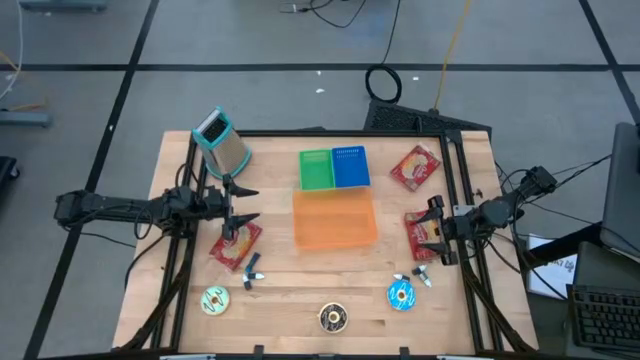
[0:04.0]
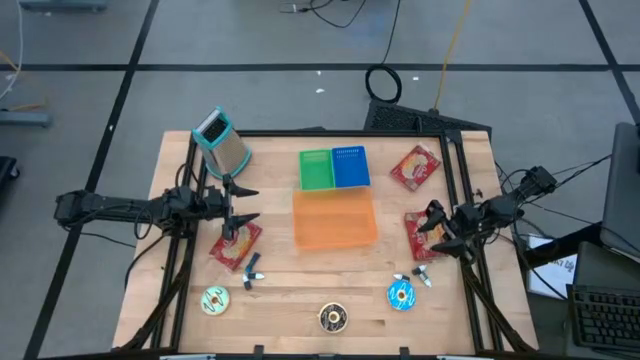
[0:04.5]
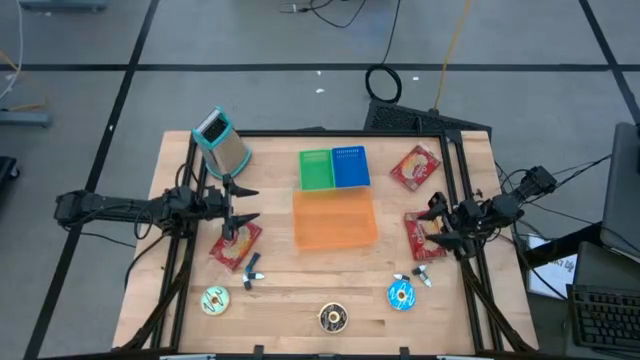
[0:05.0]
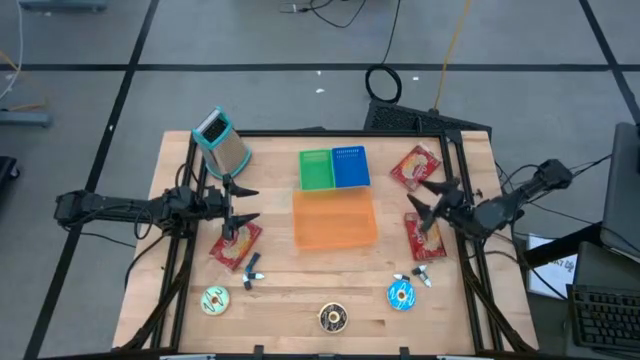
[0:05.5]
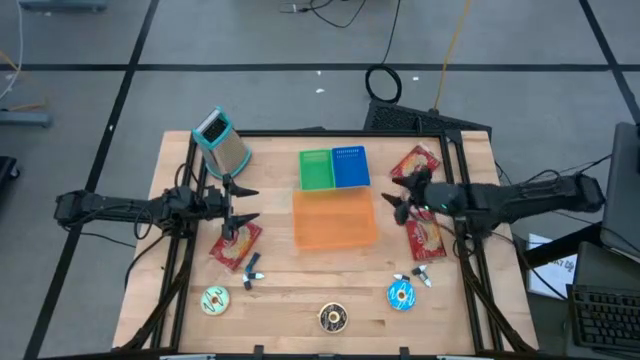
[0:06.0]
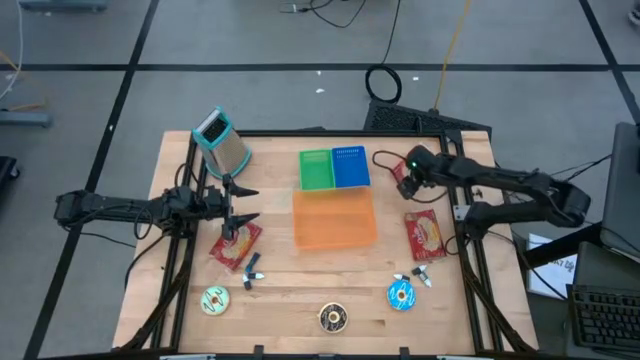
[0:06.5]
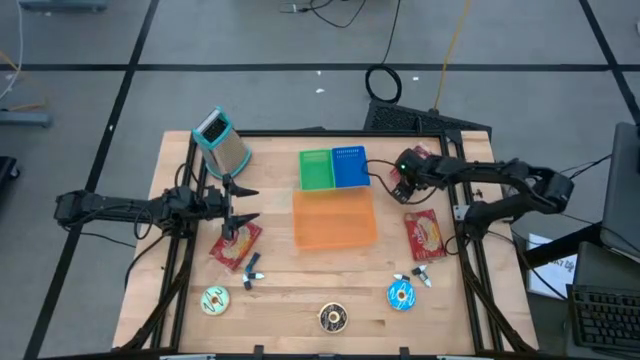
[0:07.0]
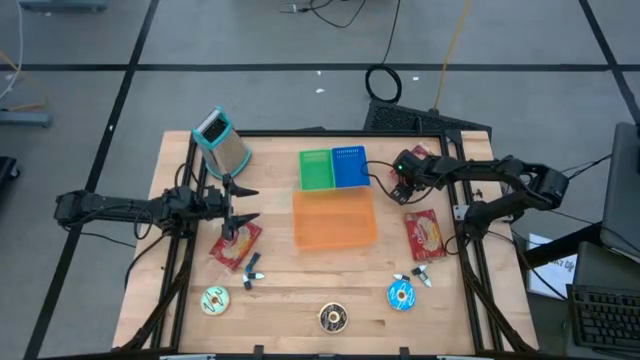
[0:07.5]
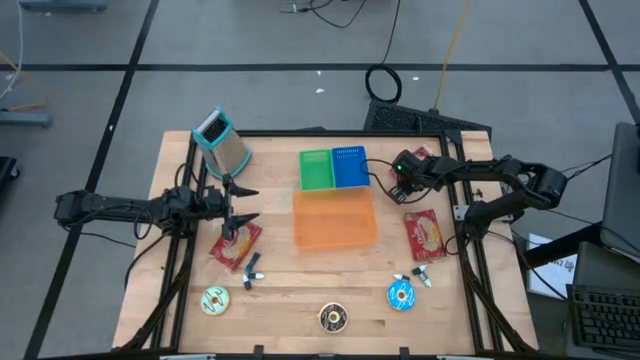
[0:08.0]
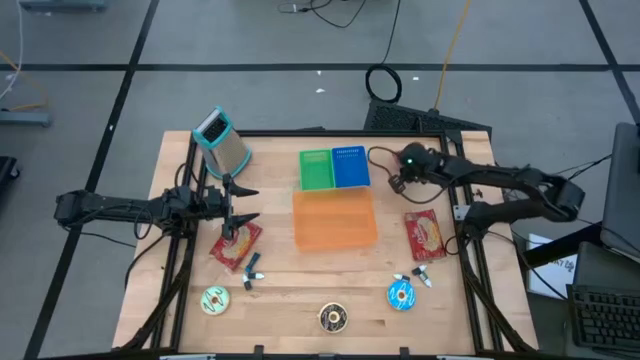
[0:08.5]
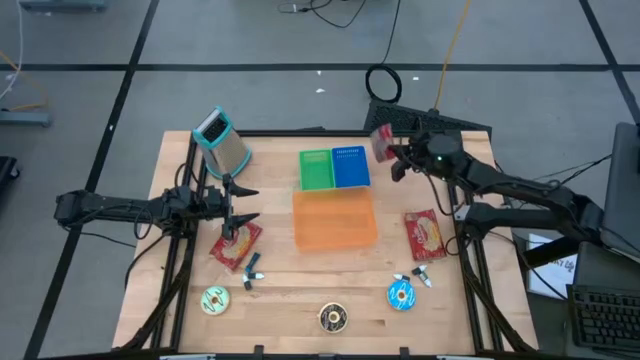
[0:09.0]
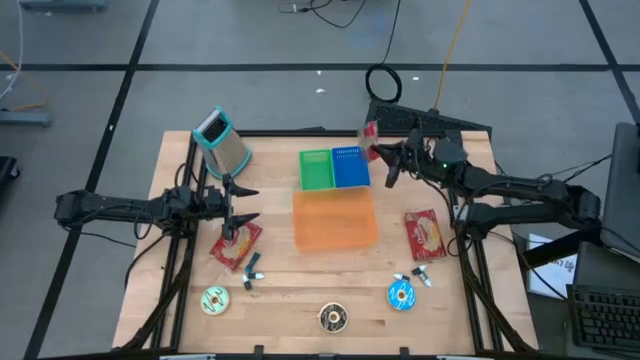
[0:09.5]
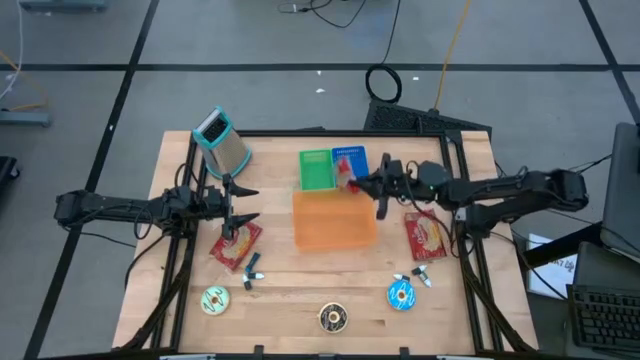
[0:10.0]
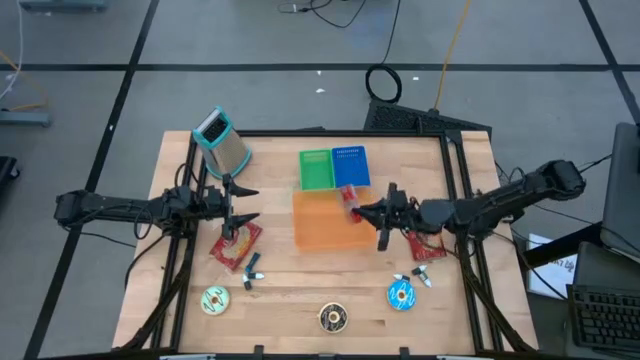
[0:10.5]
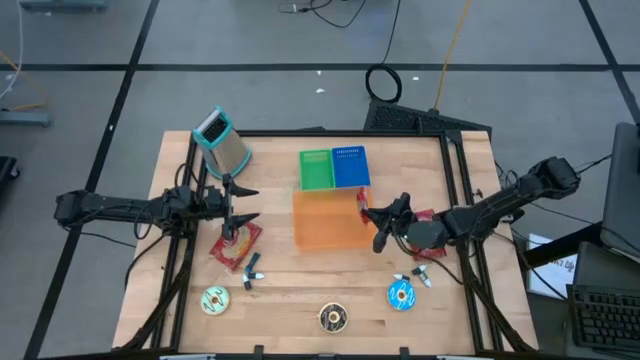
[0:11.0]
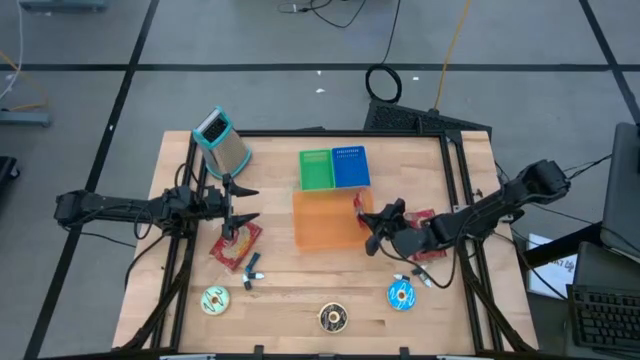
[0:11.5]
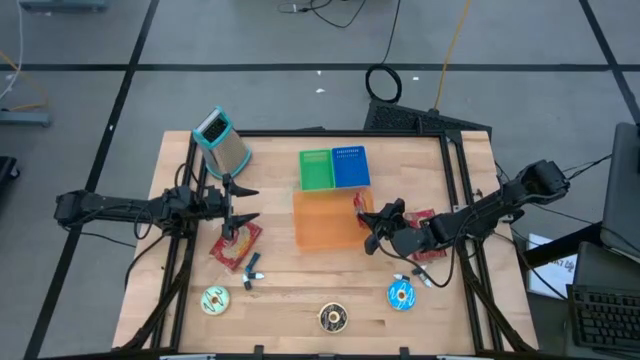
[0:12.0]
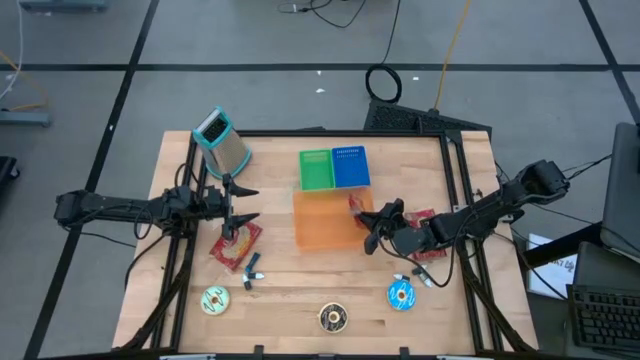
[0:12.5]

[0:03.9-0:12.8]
Put the top right red popcorn bag into the orange bin

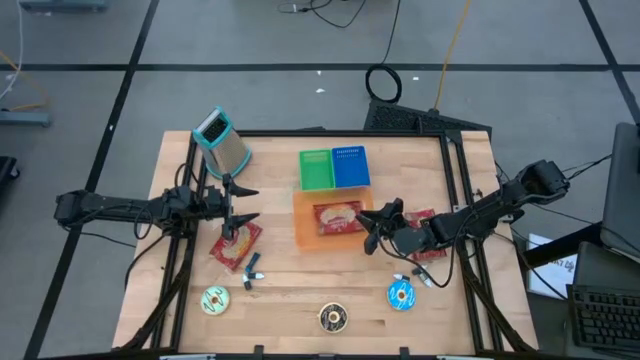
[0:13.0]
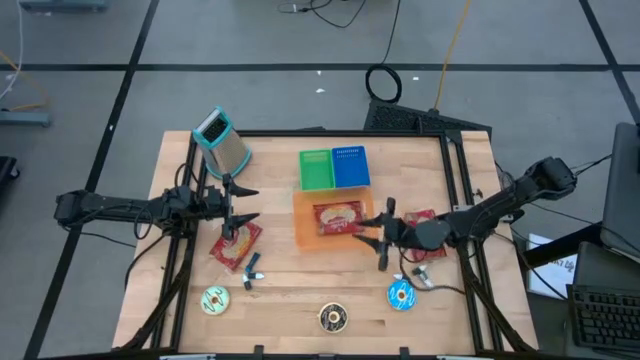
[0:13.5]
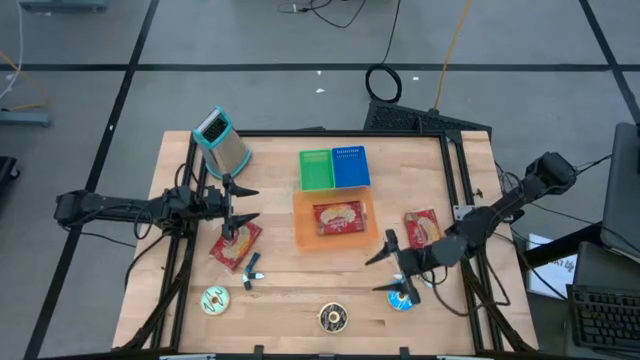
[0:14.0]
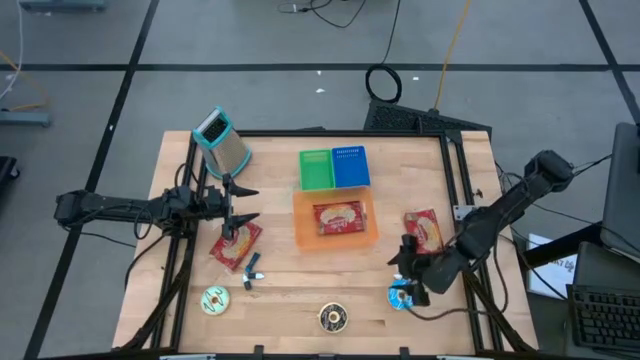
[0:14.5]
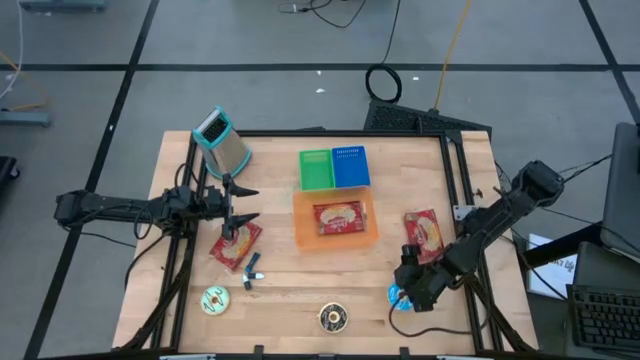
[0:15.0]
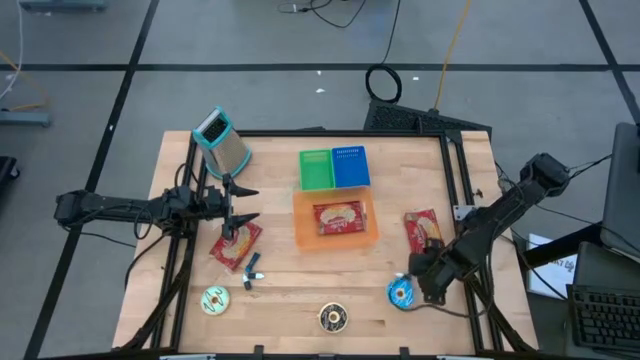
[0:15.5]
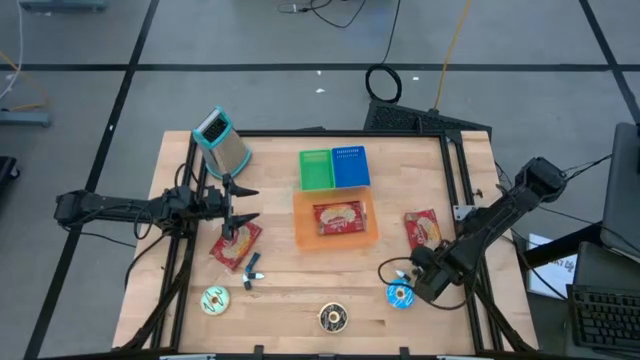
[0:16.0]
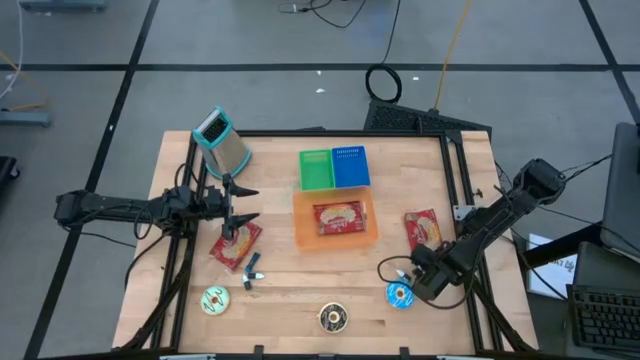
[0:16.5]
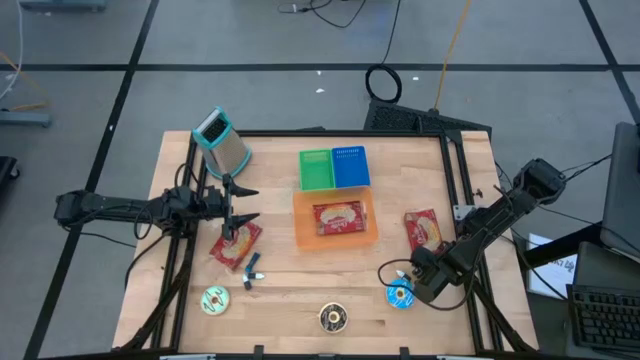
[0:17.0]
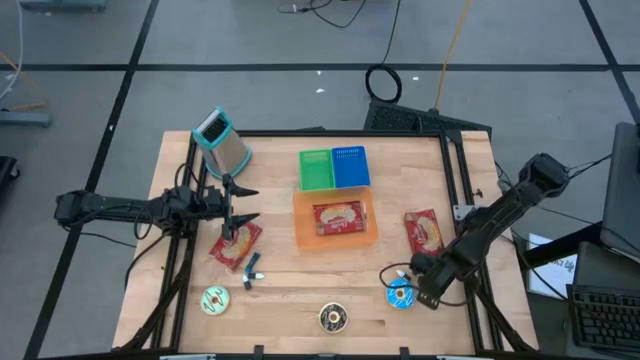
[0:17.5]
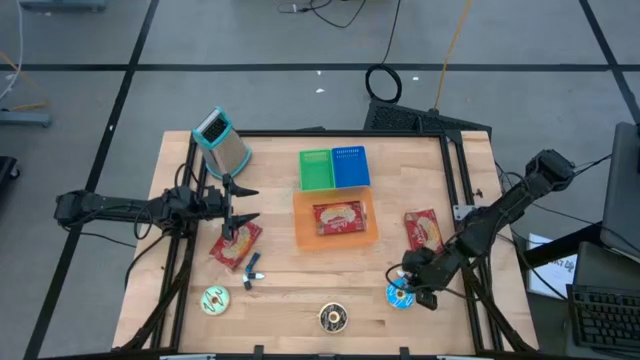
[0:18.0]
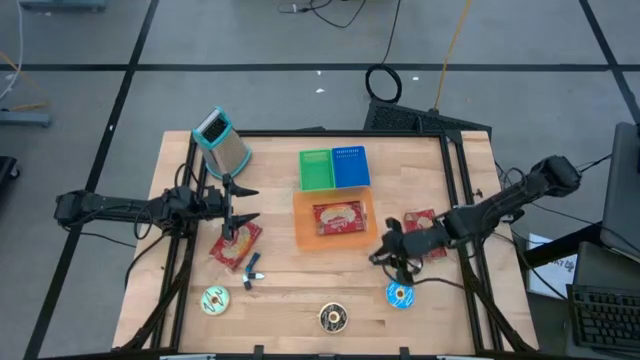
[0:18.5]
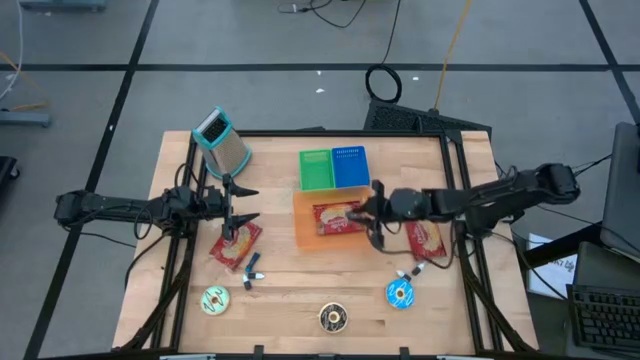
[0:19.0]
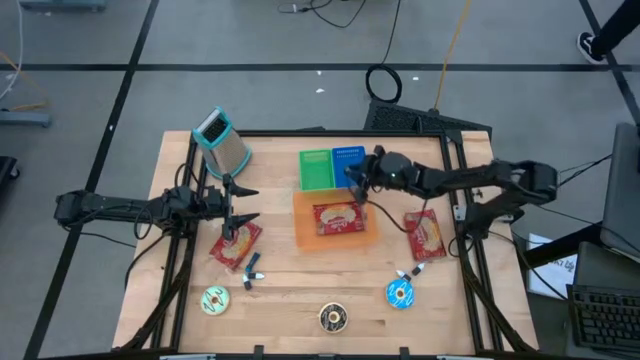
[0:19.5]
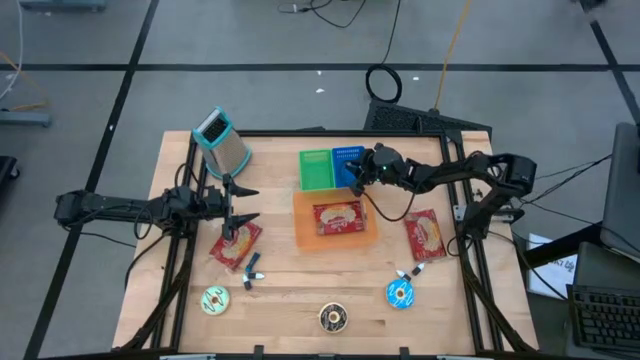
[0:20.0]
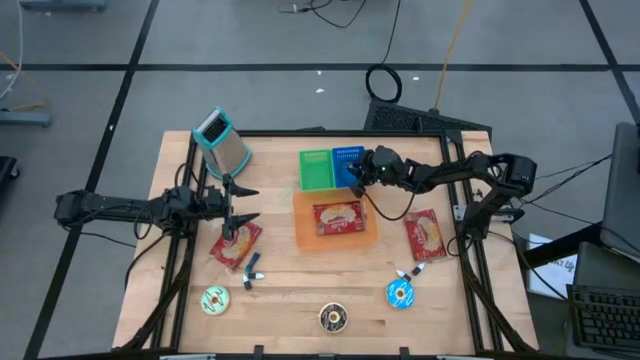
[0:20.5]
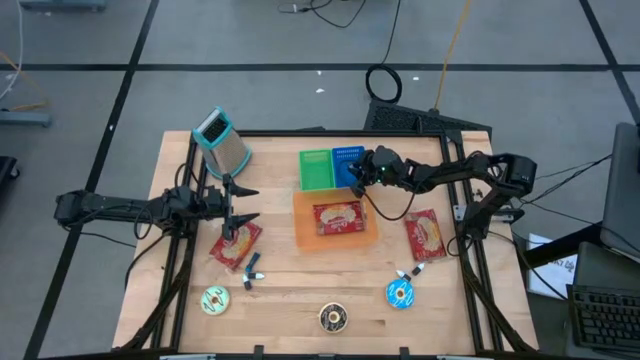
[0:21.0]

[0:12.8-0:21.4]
Put the green food coloring bottle into the blue bin

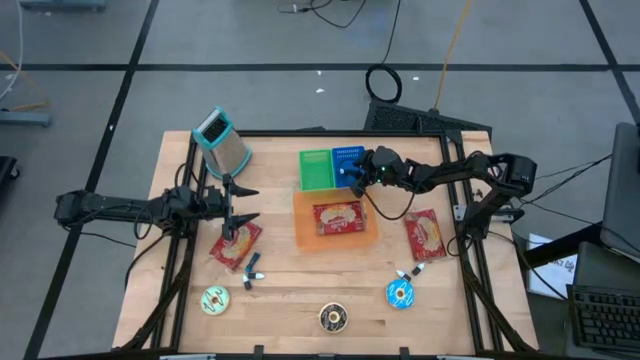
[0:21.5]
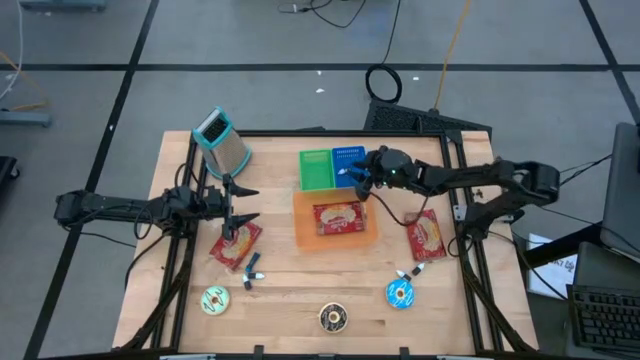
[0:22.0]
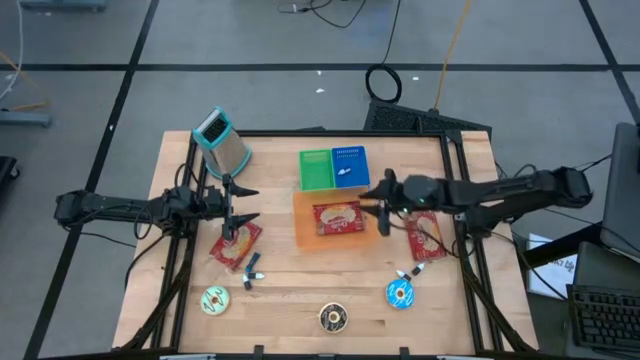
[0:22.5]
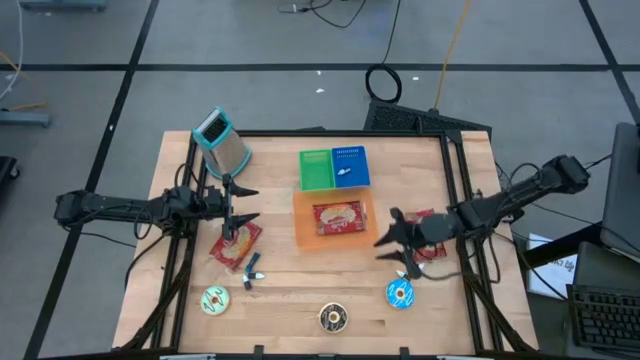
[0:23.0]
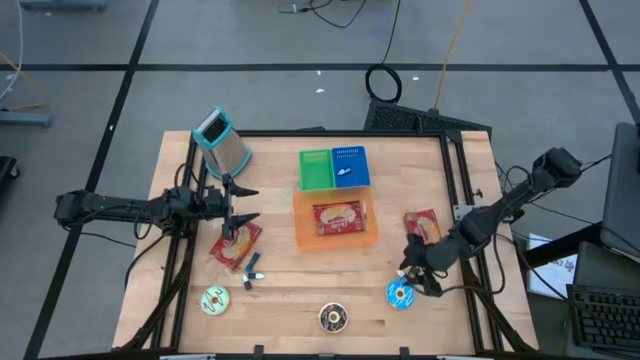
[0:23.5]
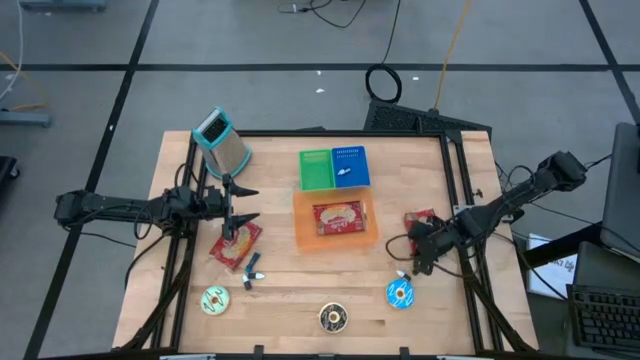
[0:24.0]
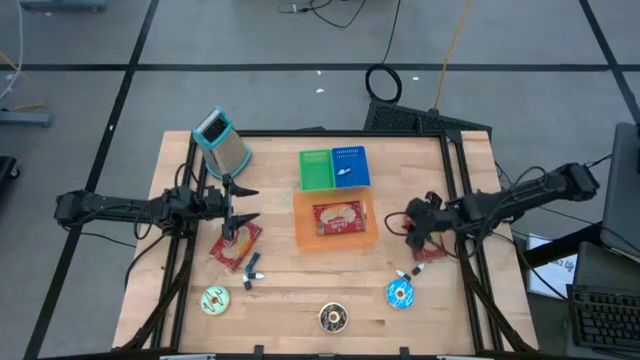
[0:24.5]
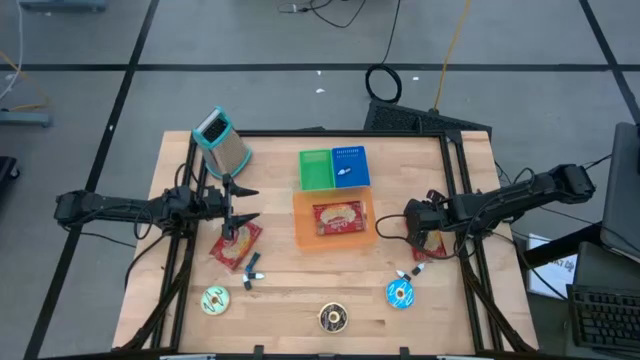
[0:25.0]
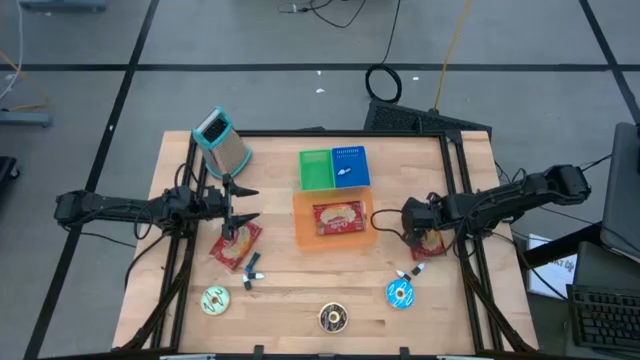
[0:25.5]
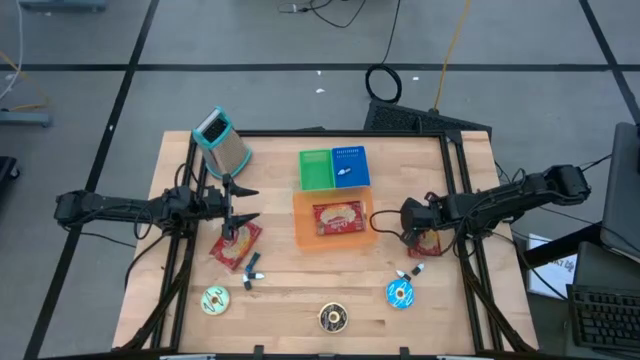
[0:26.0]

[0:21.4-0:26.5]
Put the right red popcorn bag into the orange bin
